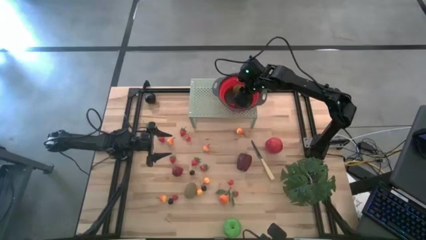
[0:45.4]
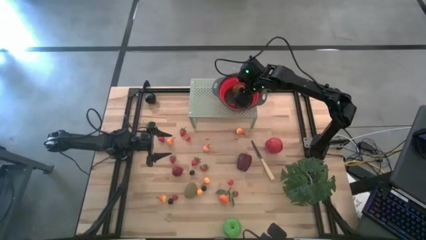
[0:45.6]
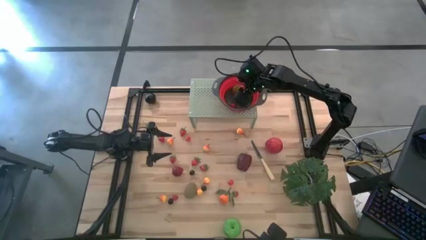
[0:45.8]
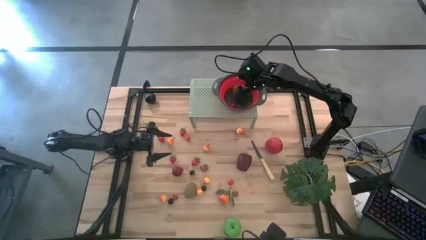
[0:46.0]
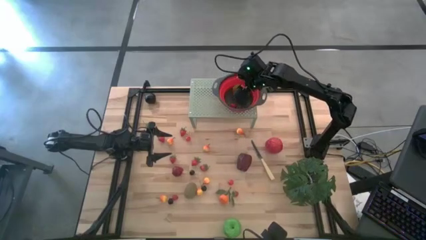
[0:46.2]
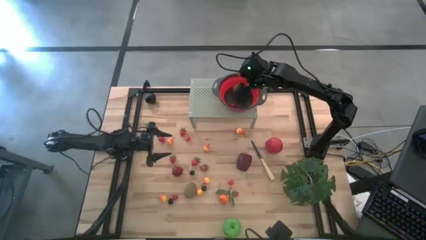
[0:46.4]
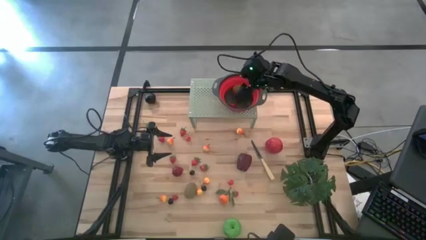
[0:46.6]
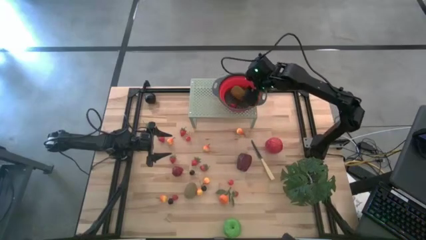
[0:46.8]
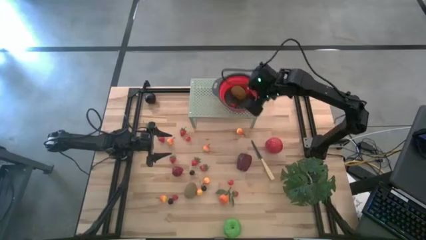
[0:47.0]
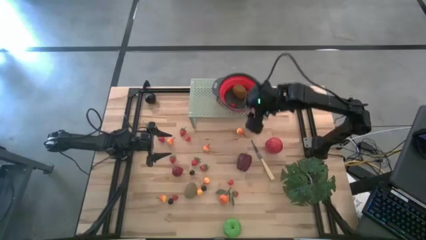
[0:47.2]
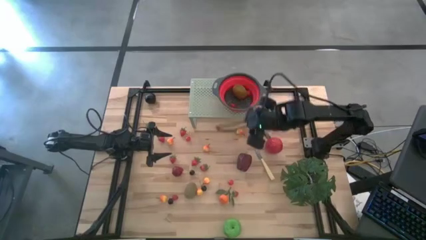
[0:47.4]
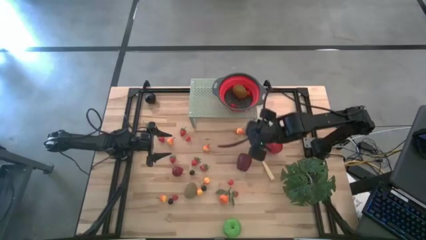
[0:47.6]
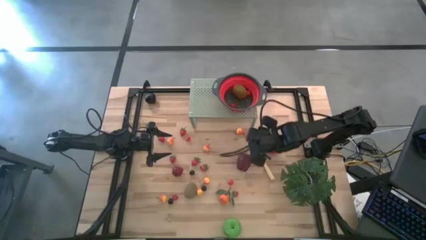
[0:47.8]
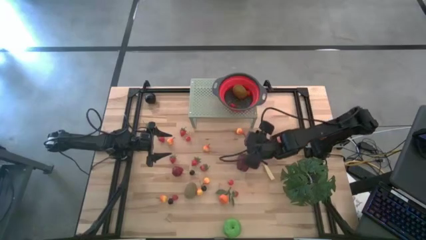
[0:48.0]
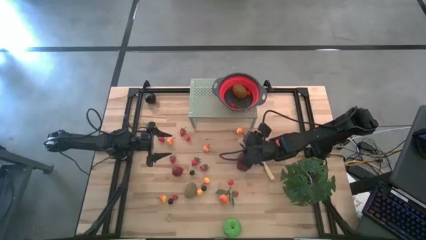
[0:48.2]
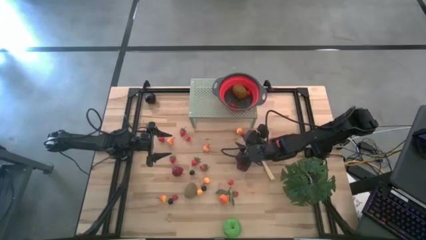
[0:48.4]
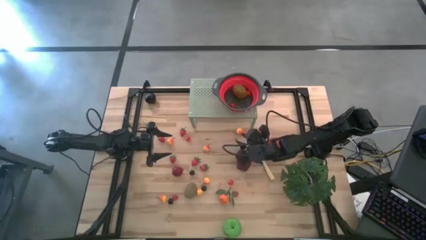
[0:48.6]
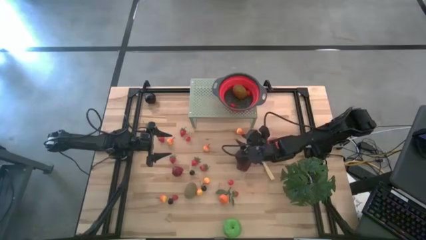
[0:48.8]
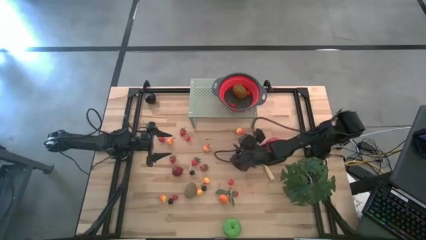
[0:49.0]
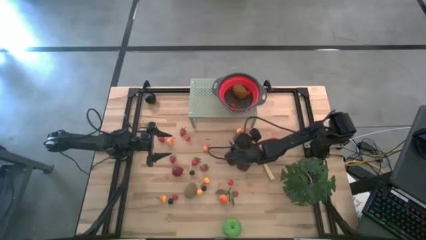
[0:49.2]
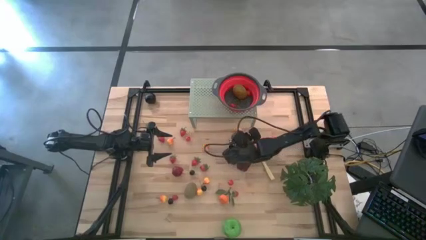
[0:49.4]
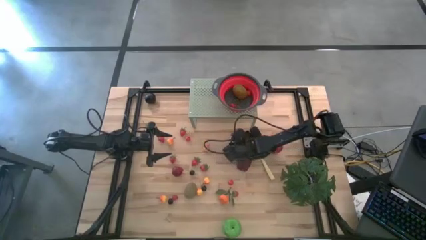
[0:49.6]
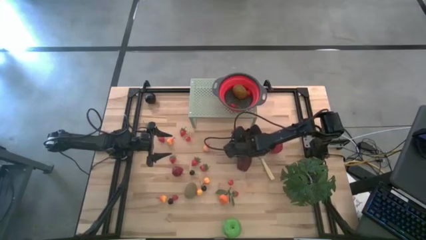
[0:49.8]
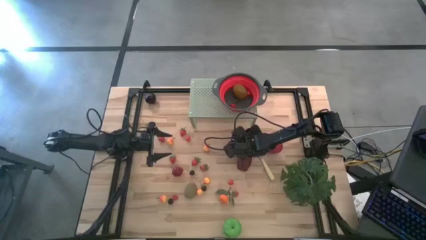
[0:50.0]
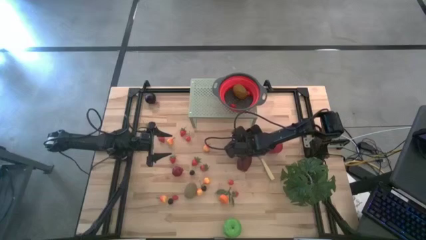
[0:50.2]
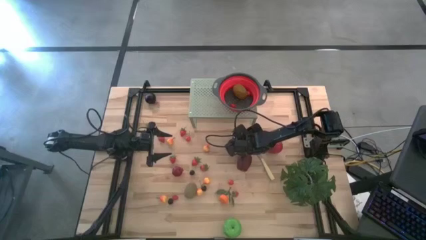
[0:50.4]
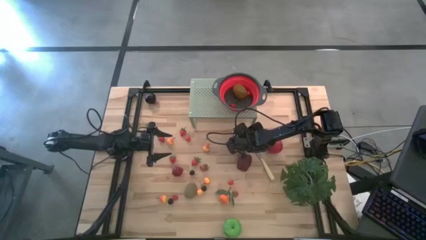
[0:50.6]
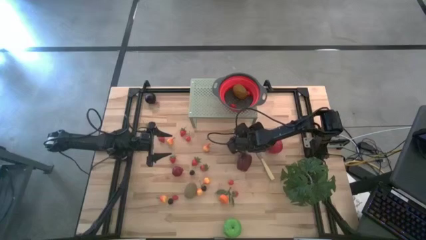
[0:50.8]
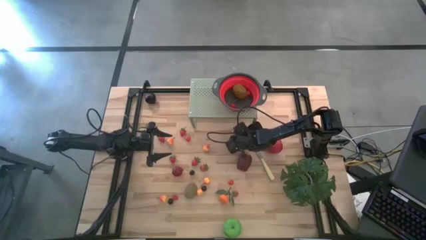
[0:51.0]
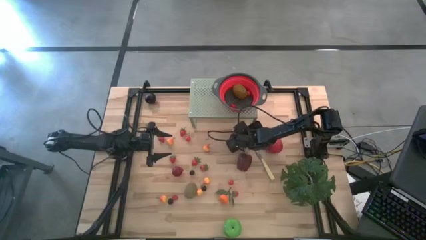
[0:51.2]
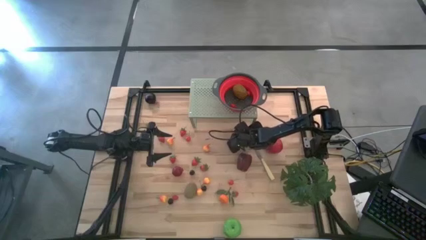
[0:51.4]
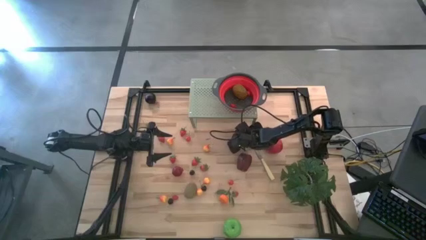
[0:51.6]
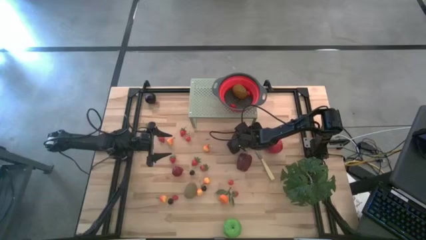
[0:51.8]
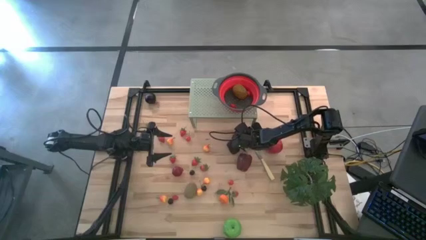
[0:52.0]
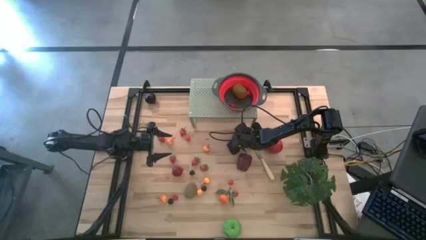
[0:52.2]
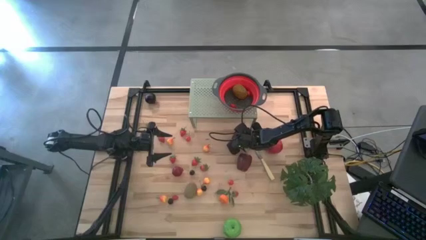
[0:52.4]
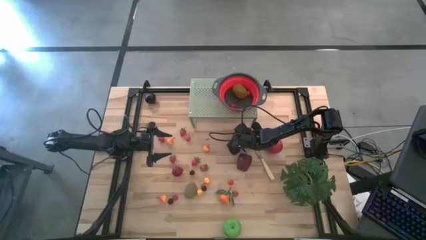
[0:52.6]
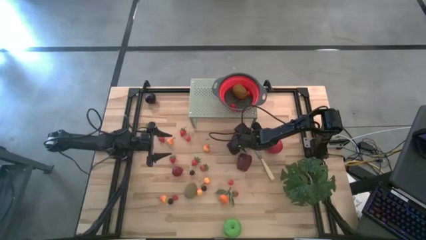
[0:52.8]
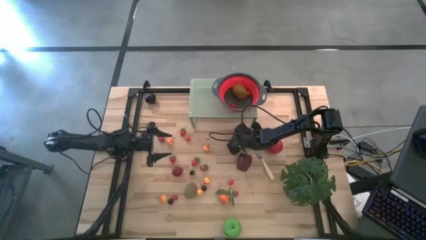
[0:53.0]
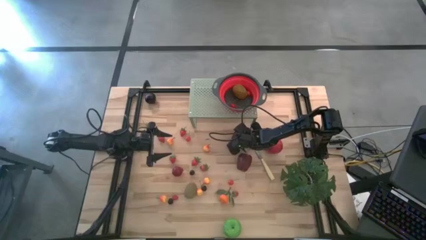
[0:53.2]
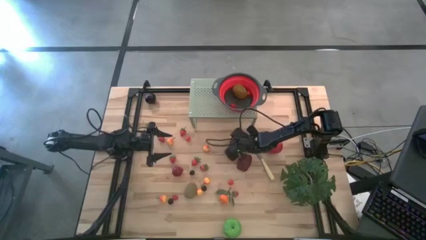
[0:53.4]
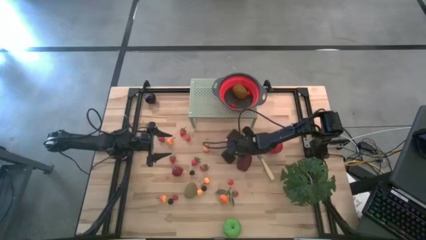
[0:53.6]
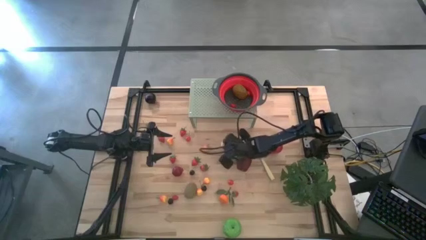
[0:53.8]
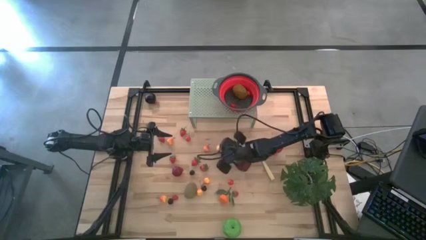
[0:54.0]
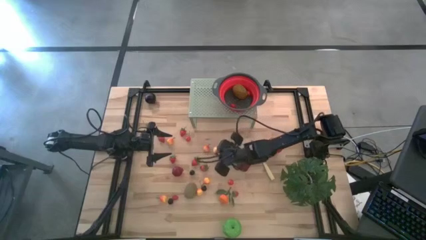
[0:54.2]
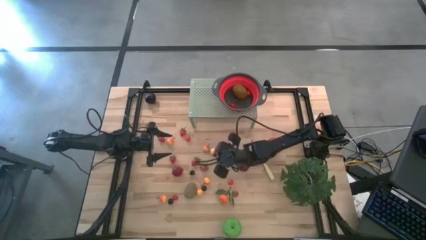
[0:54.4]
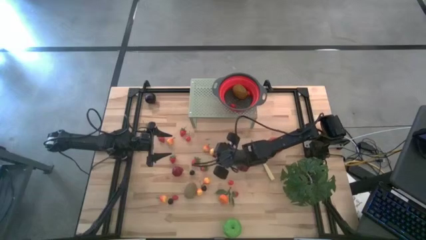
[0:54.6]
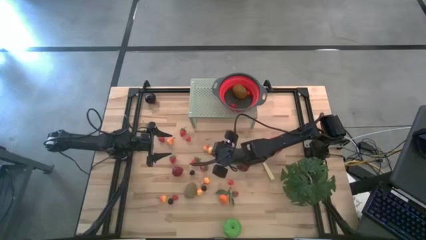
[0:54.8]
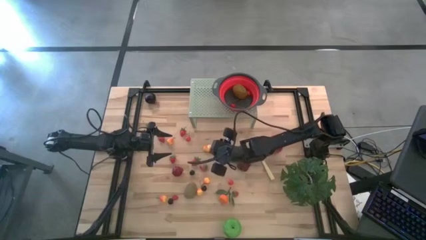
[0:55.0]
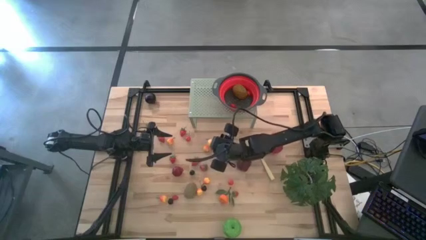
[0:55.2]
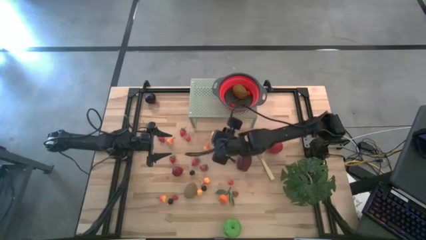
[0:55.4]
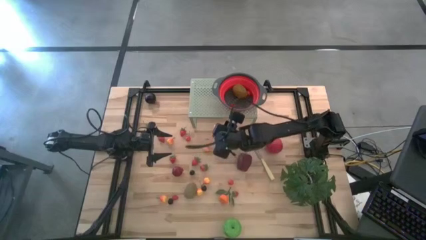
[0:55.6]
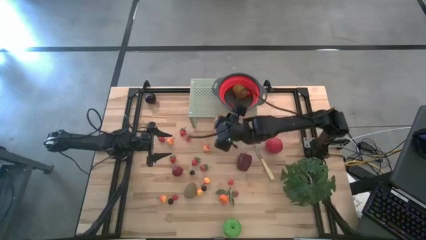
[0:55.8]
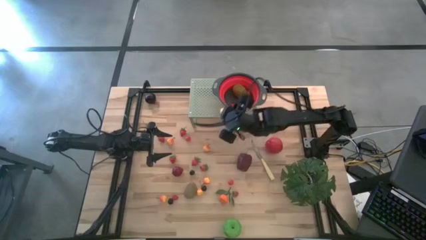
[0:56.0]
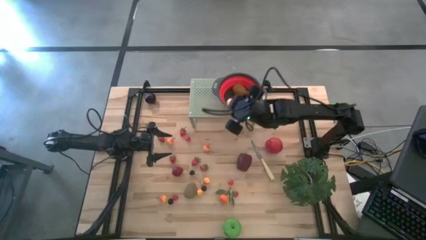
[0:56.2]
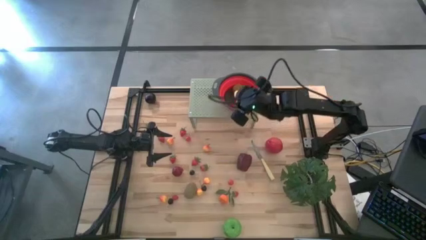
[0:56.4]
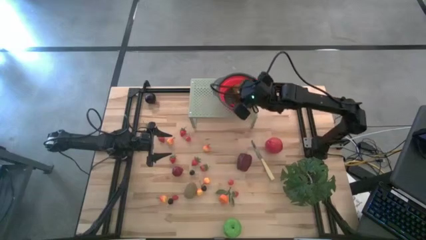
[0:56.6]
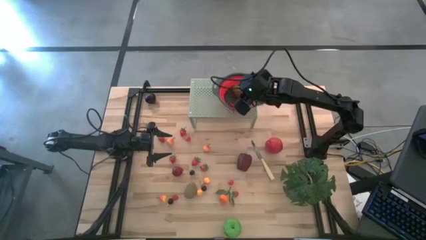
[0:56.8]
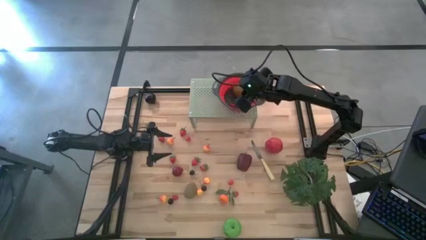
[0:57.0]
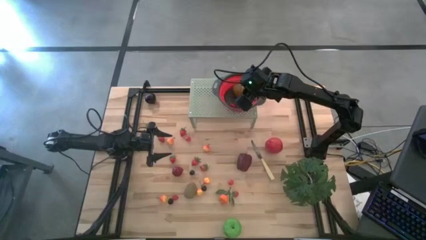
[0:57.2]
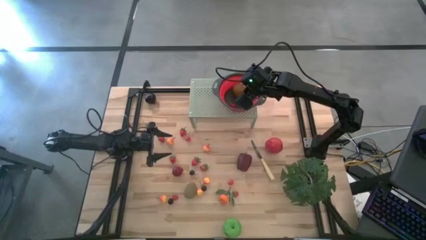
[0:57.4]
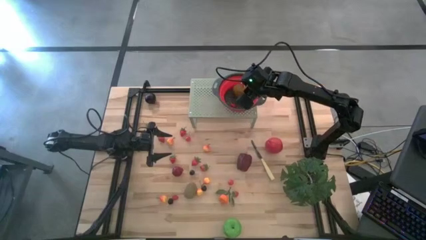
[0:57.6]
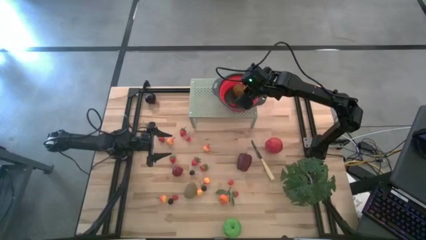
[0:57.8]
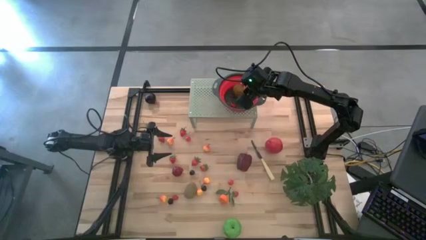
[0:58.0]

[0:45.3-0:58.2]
Task: Pick & Place Fruit
Put the orange peach into the black strainer bowl on the shelf

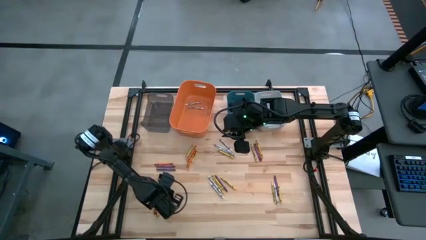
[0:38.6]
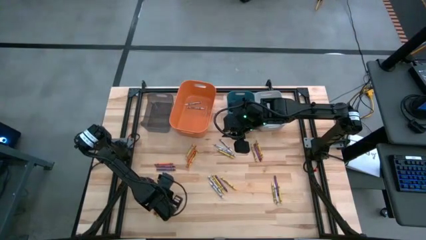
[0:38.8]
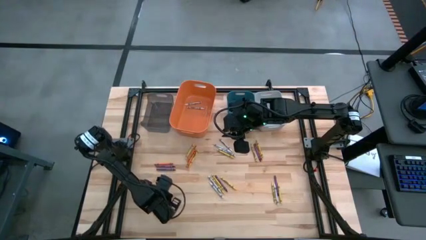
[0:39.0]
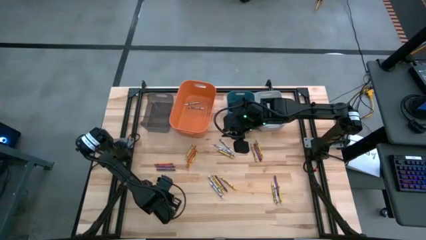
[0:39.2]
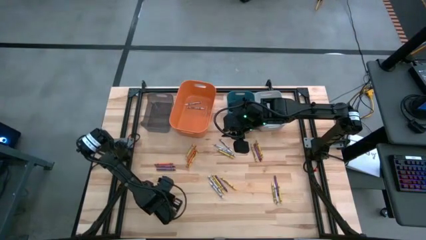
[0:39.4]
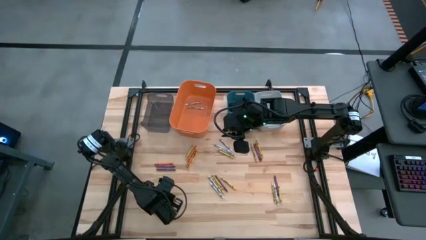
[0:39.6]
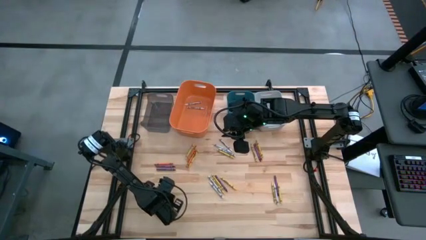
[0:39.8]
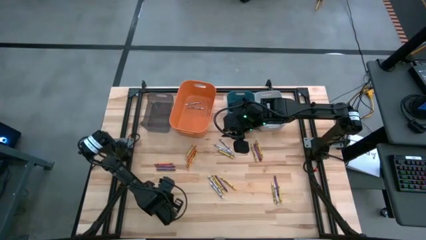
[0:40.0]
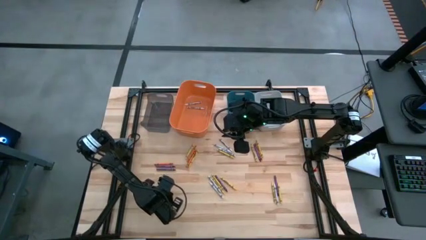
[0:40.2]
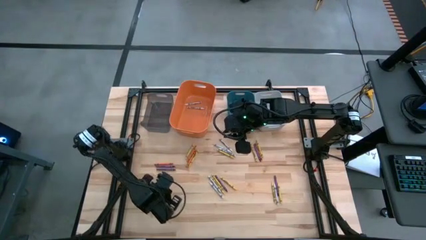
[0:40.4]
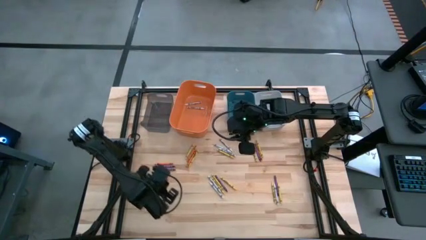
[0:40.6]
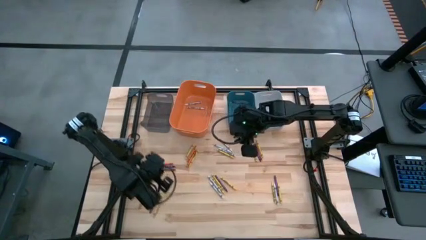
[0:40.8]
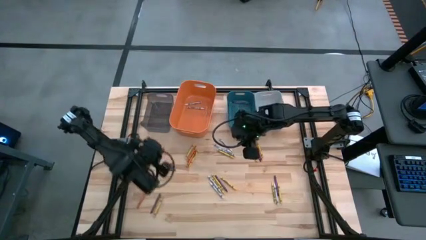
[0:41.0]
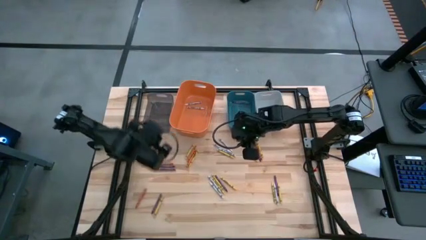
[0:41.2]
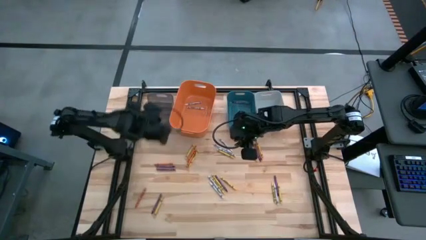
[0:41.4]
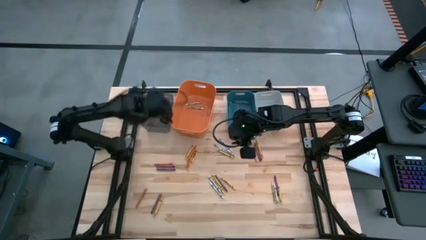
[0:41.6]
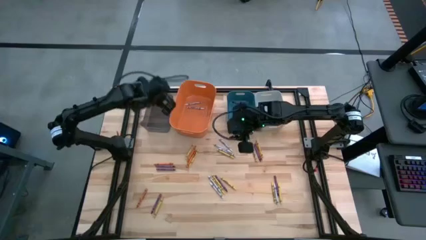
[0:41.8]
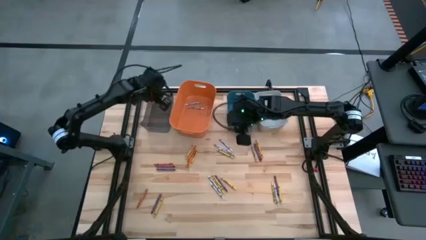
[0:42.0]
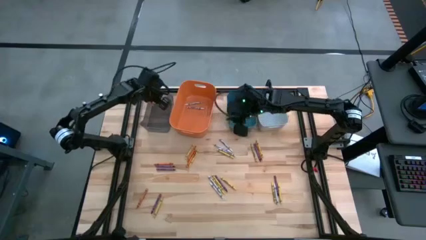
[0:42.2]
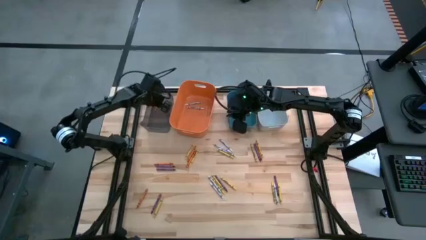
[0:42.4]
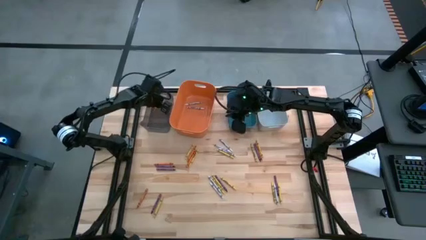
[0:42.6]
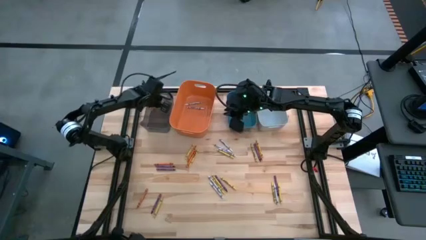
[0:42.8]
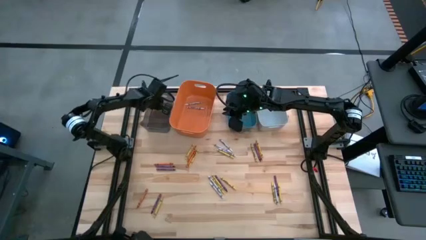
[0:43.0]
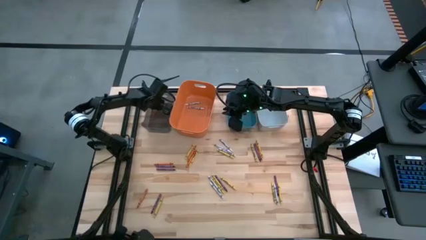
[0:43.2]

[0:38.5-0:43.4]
Task: Sort crayons
Put the orange crayon into the black bin
